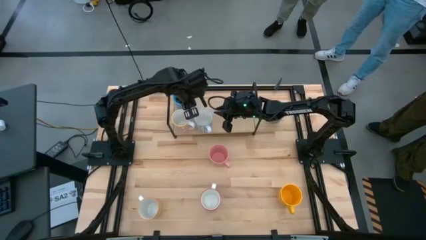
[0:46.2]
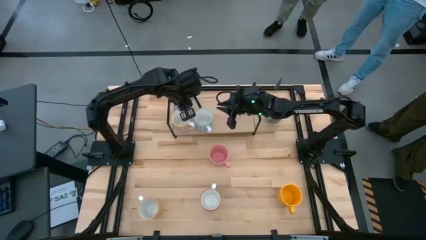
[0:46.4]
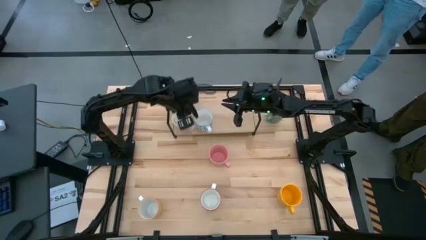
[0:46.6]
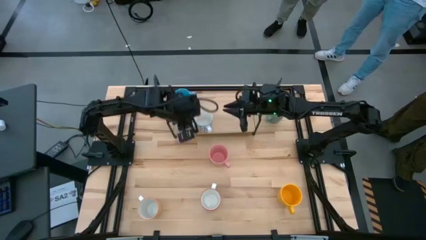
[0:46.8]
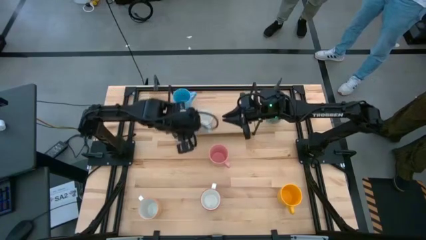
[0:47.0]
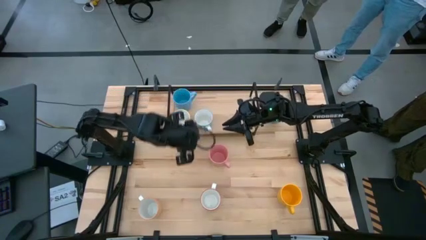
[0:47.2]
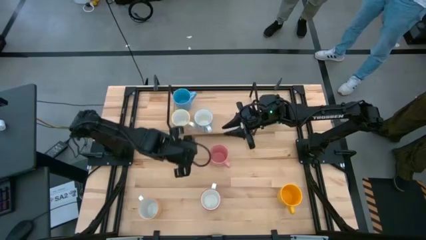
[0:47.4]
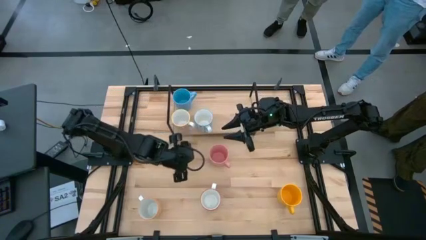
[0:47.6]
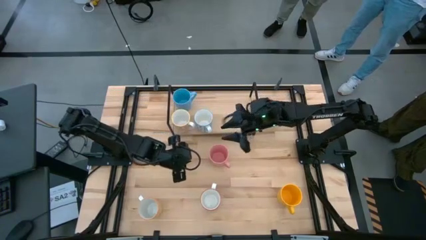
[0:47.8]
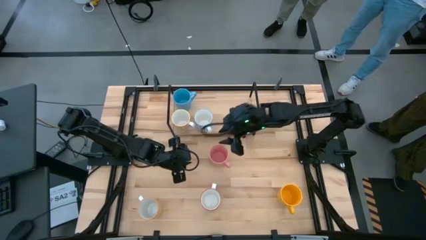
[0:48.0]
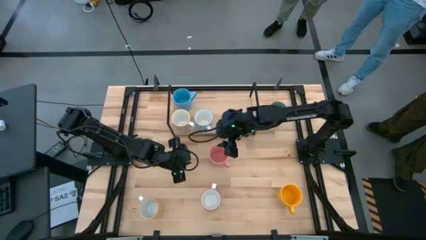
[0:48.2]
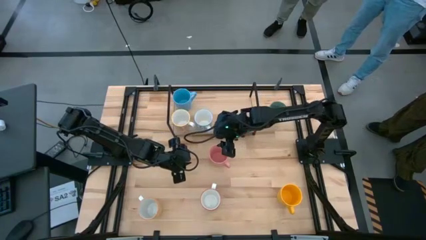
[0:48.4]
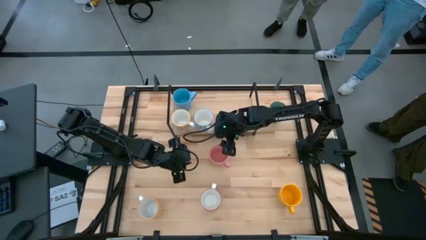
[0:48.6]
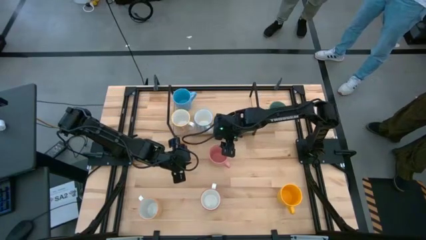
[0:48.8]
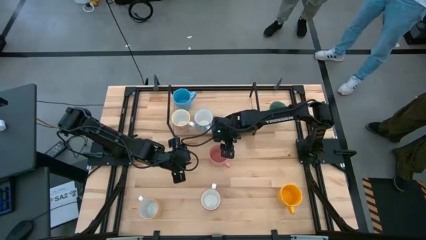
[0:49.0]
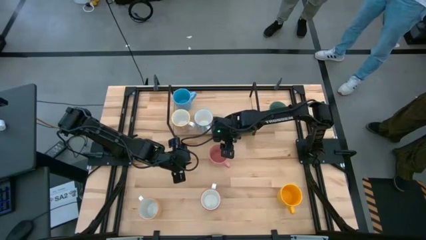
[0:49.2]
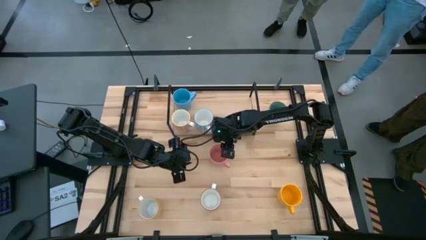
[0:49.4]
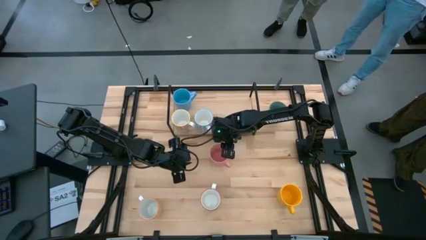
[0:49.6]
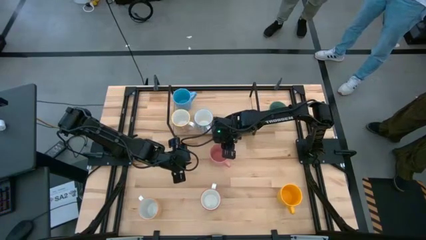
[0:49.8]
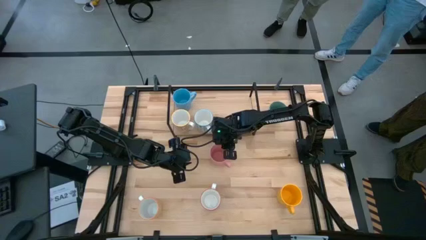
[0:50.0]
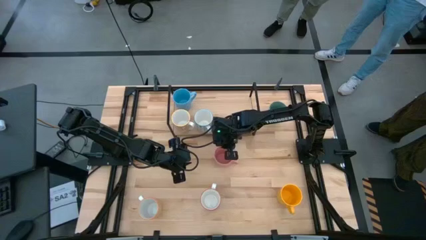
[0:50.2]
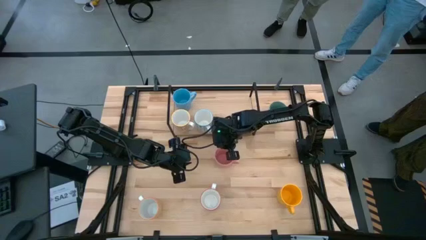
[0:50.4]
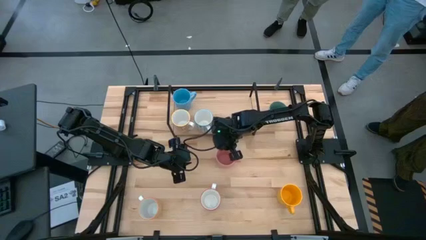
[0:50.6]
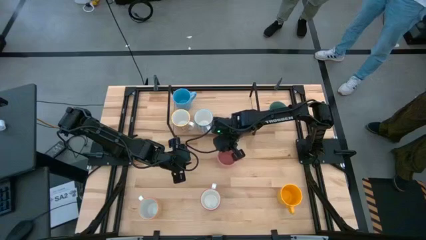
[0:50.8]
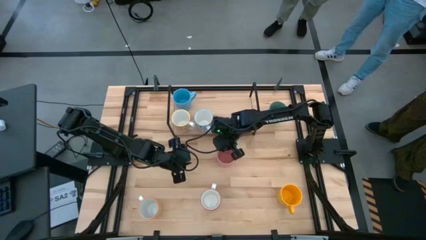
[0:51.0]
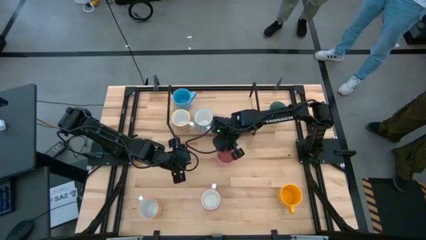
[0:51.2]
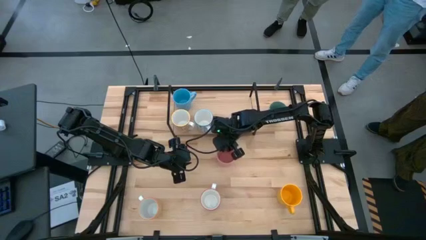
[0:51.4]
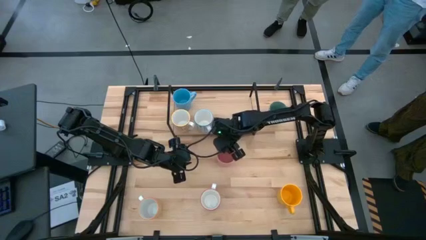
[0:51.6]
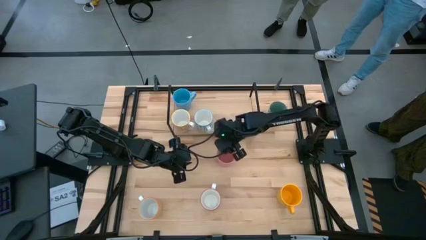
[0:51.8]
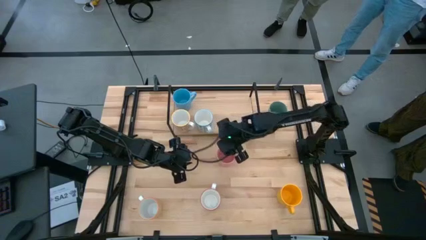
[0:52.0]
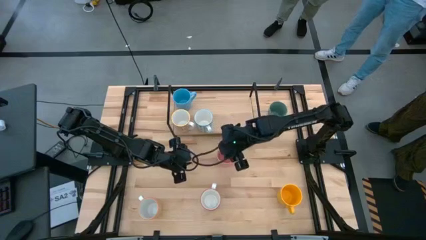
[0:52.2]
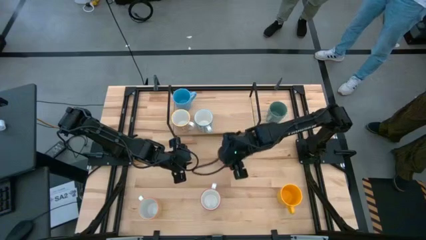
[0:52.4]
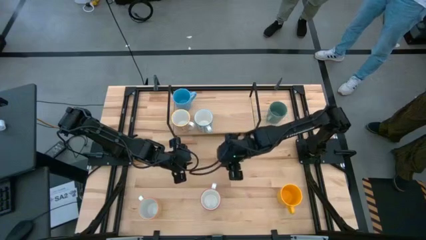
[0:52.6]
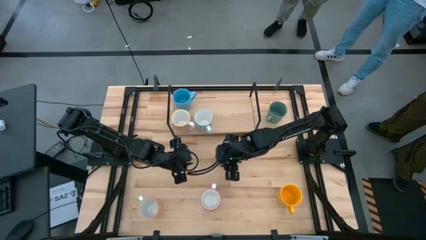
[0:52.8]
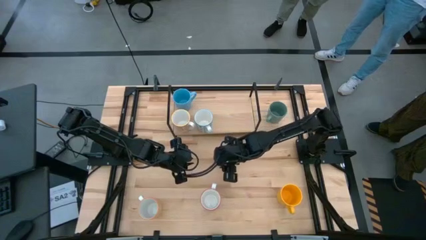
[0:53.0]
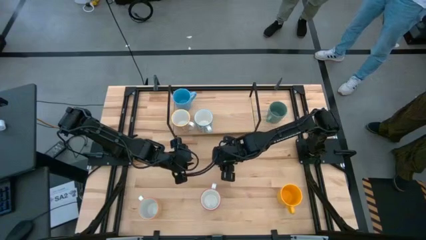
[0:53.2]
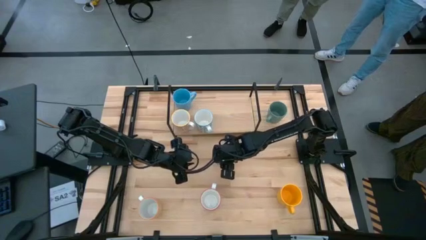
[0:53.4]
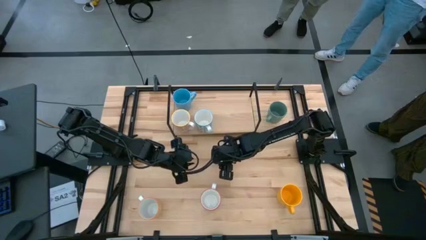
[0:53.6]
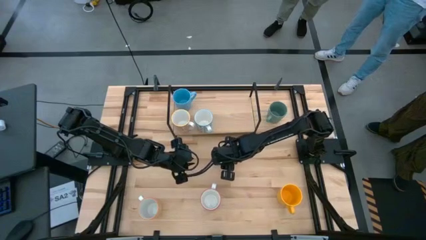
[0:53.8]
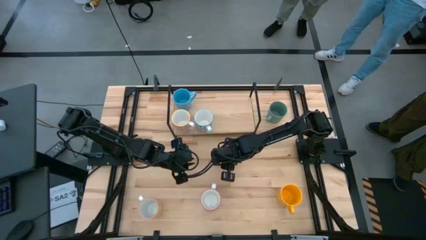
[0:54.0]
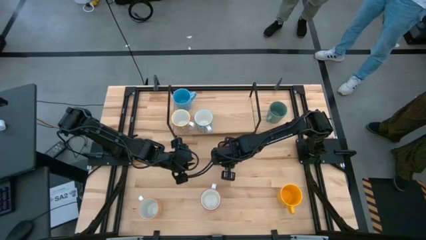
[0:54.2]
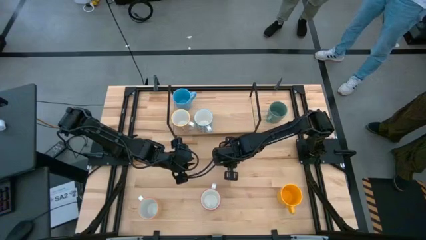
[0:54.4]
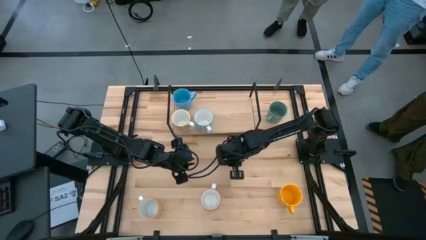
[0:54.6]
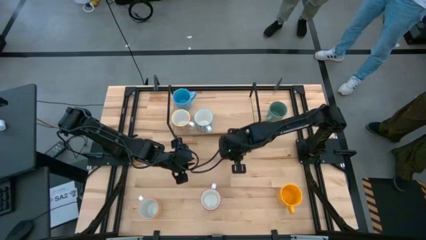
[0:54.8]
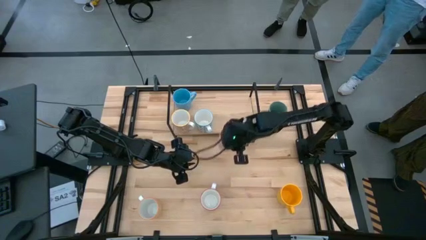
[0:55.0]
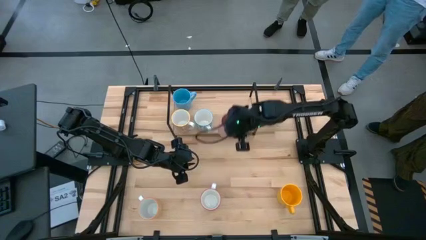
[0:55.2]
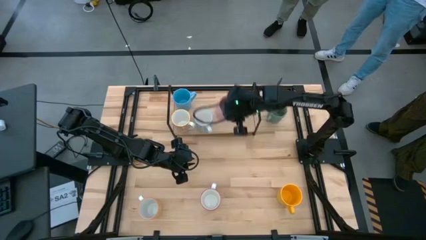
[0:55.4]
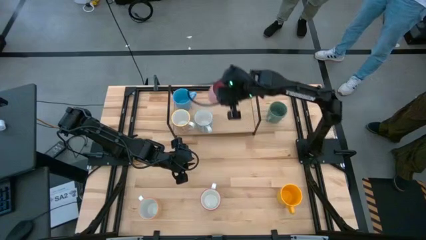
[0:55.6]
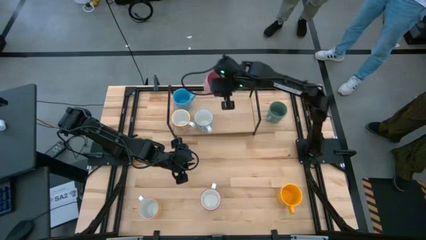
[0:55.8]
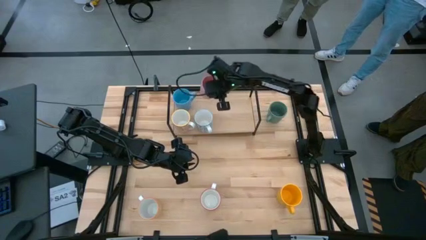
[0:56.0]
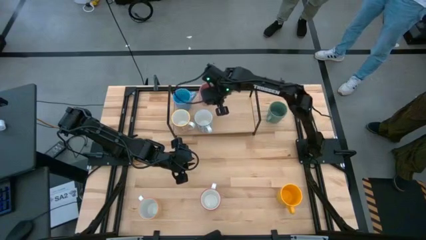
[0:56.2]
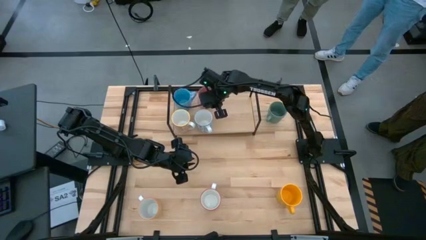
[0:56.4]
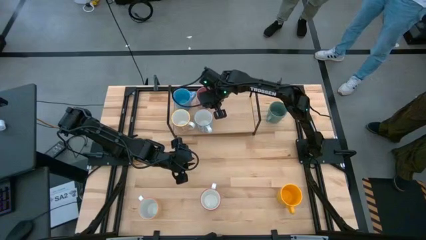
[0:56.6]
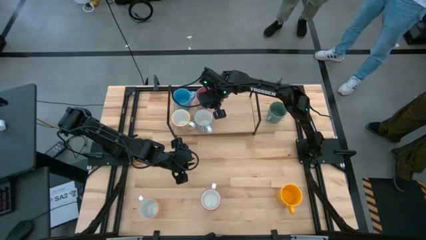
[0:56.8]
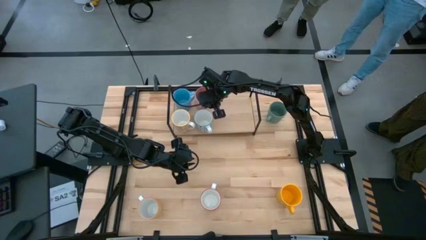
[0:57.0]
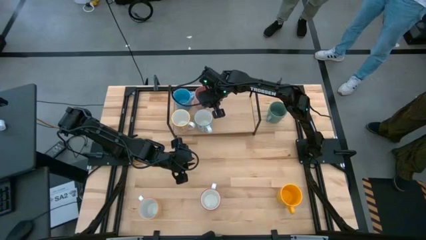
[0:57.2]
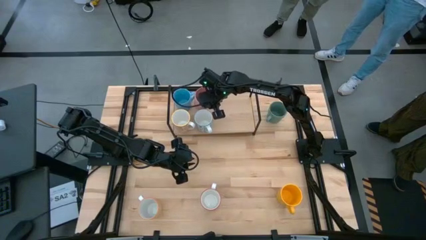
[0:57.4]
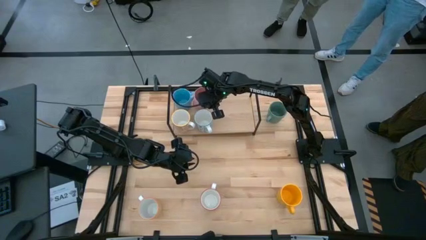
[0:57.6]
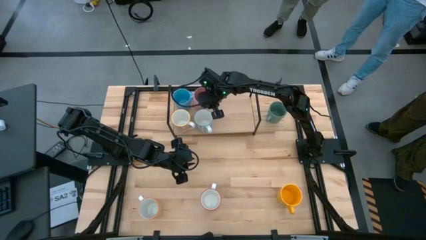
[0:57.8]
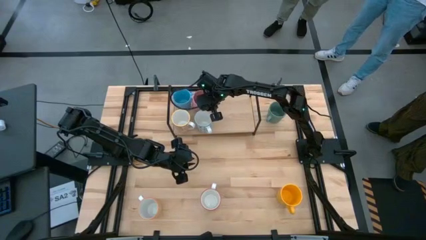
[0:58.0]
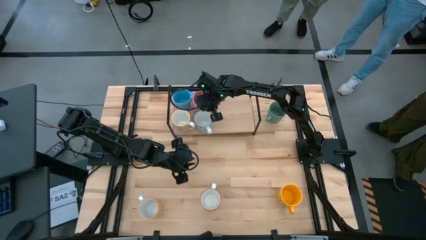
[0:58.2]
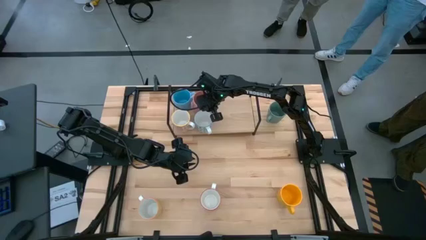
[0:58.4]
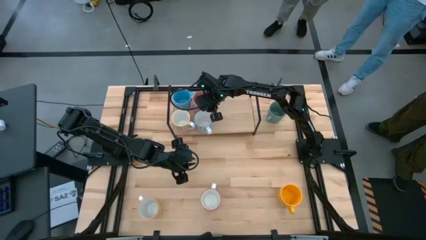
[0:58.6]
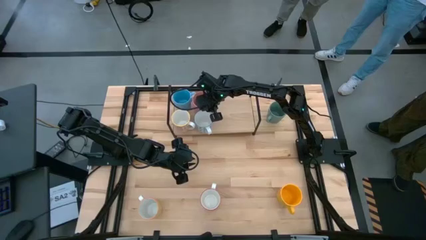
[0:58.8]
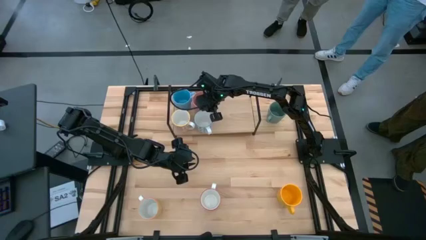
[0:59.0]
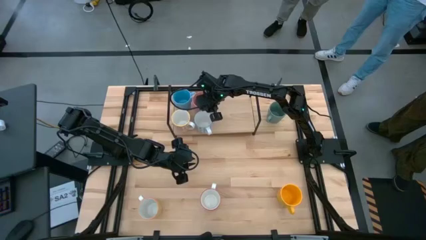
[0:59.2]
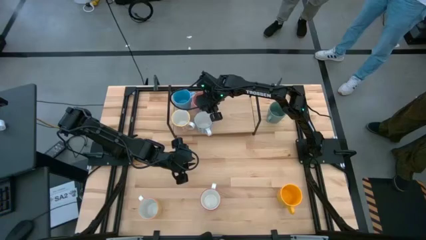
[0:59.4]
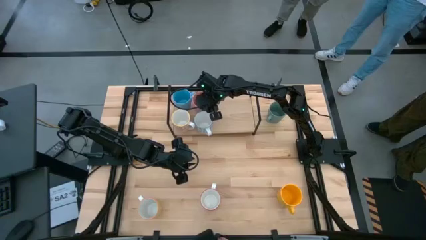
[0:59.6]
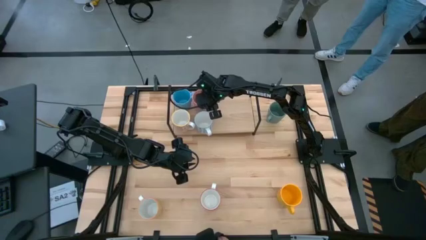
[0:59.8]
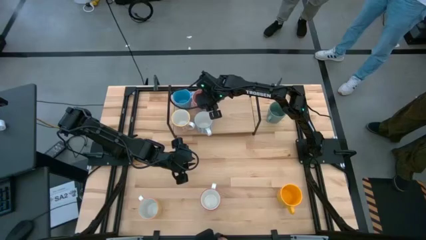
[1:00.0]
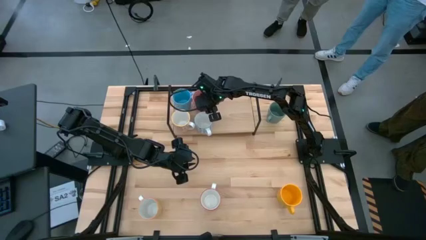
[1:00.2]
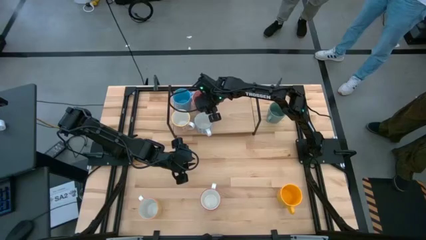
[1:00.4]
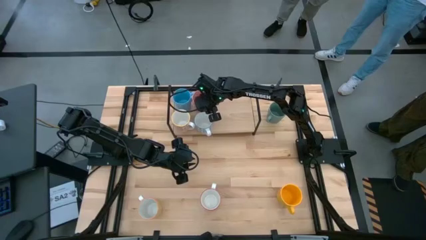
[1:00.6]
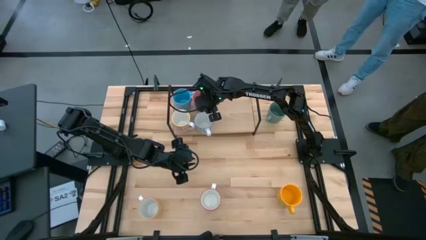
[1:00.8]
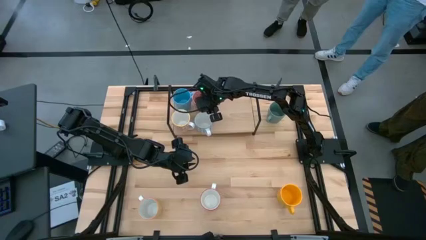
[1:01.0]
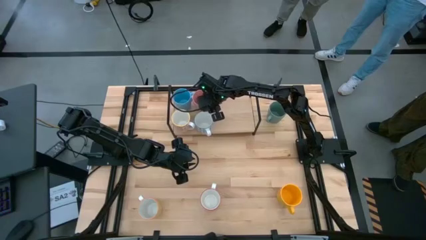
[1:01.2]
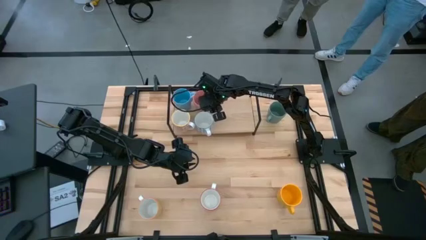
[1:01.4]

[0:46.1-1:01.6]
Task: Place coffee mugs
Put the pink mug on the shelf

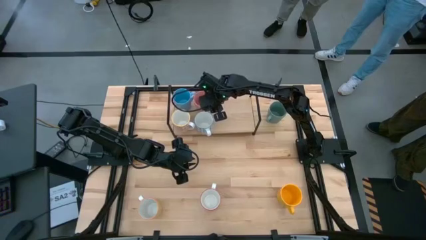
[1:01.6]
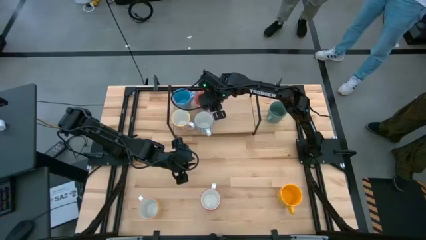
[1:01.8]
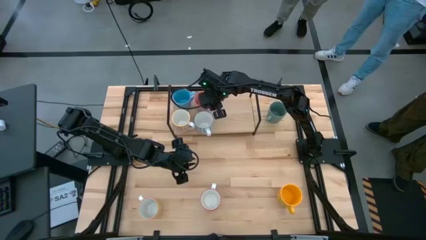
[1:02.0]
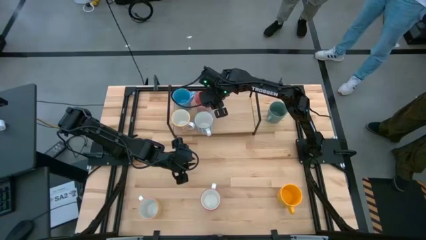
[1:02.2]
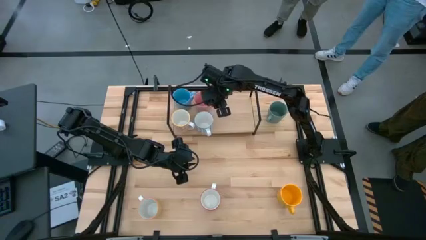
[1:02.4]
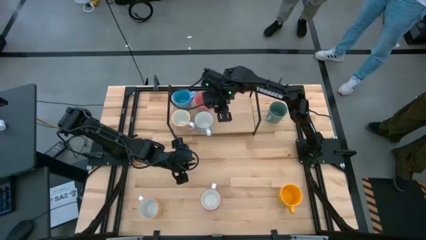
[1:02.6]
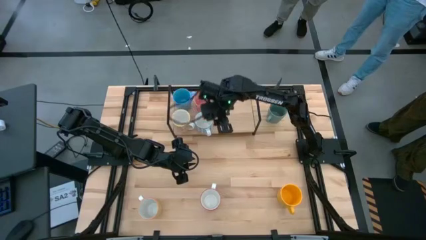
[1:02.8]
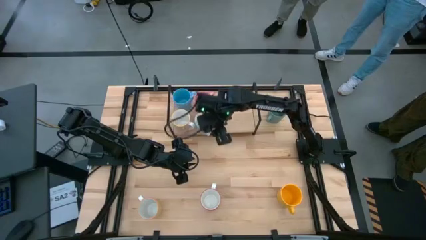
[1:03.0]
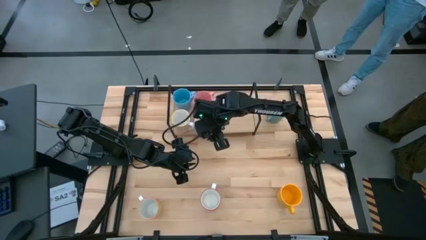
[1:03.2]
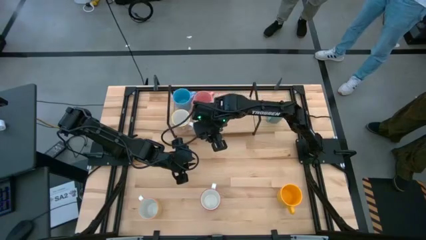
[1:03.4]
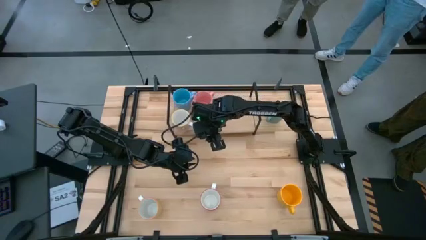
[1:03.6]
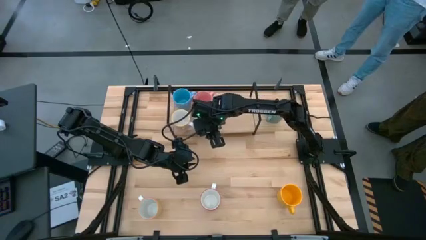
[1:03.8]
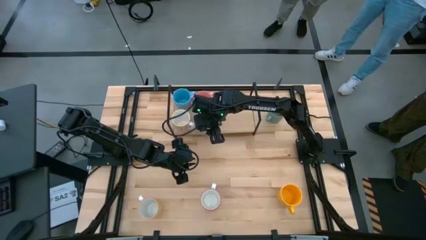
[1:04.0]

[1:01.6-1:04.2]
Adjust the blue patterned mug on the shelf

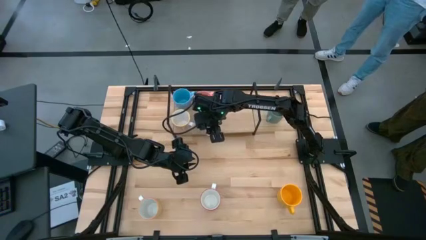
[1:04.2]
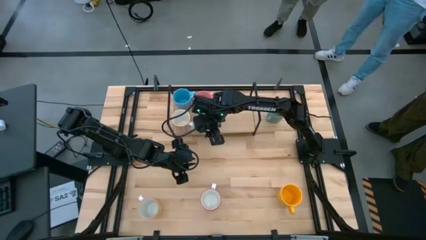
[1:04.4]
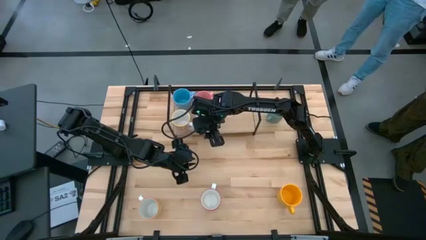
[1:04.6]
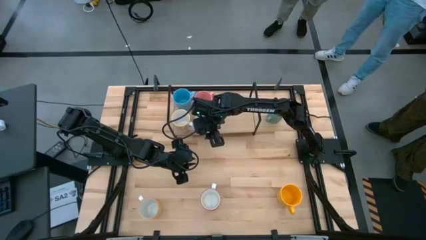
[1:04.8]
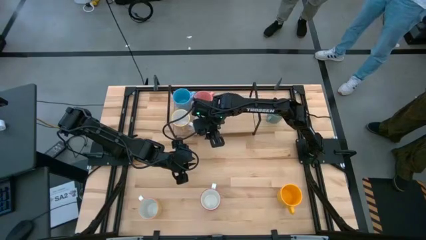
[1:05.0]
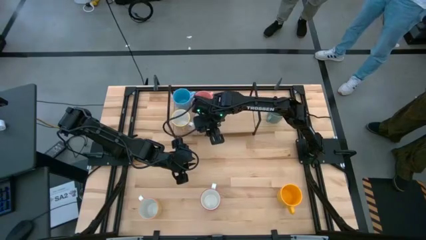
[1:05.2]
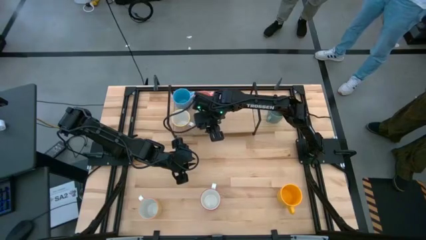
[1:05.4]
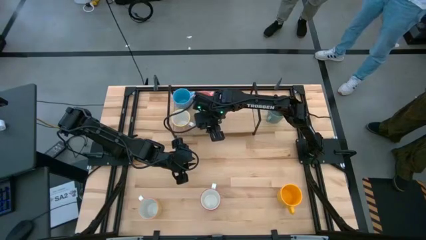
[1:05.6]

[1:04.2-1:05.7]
Adjust the blue patterned mug on the shelf
